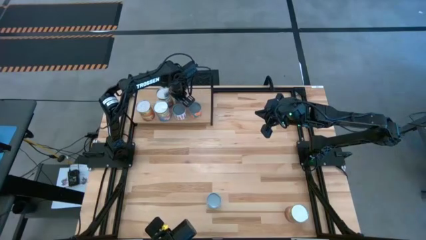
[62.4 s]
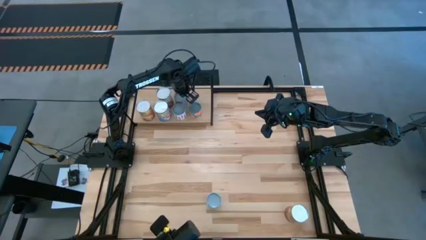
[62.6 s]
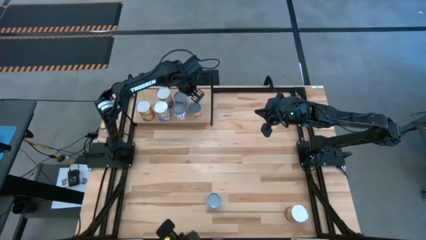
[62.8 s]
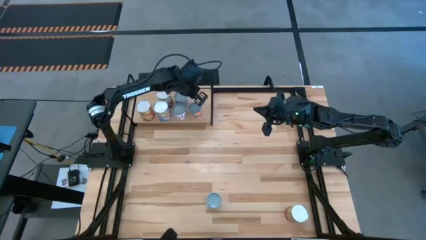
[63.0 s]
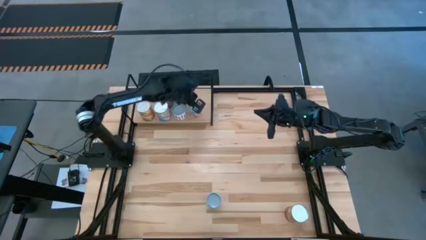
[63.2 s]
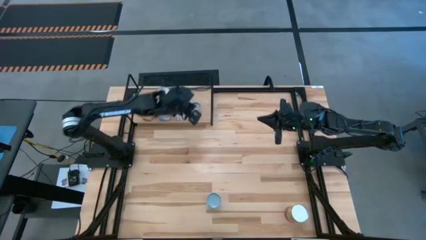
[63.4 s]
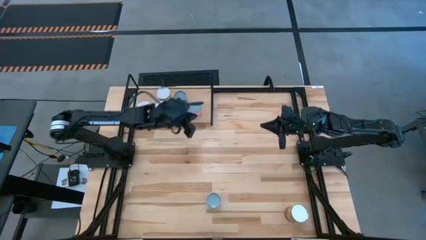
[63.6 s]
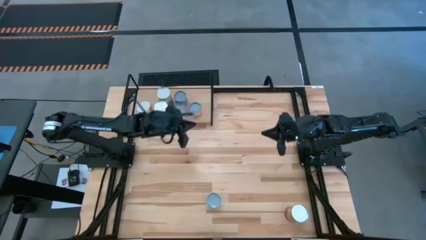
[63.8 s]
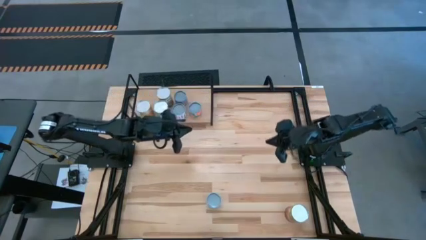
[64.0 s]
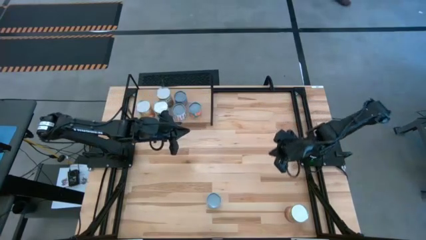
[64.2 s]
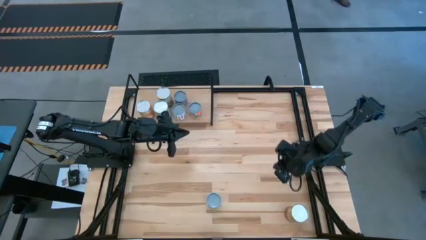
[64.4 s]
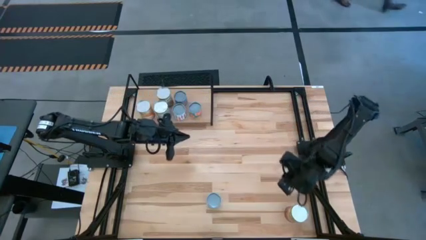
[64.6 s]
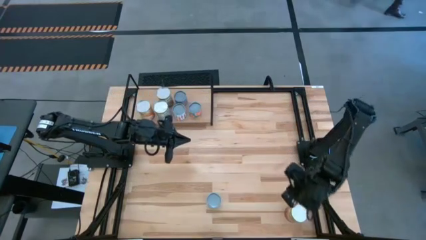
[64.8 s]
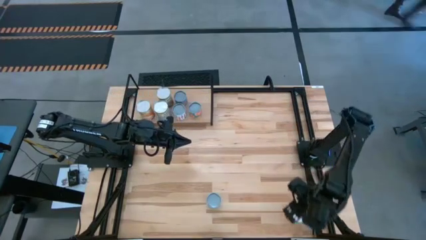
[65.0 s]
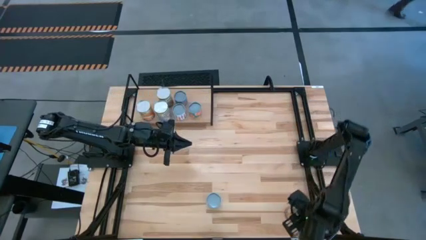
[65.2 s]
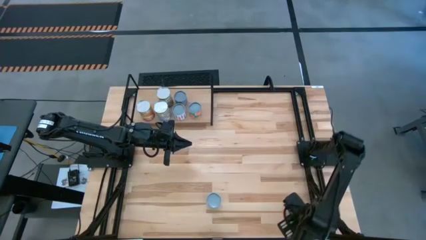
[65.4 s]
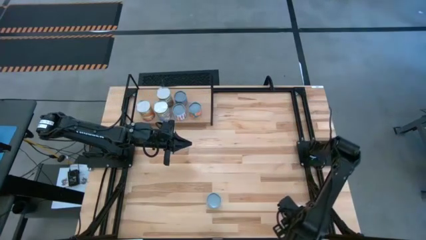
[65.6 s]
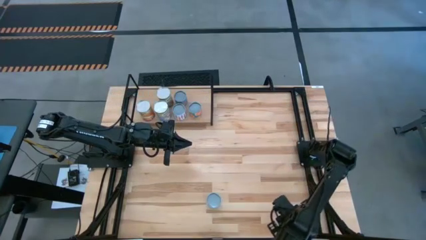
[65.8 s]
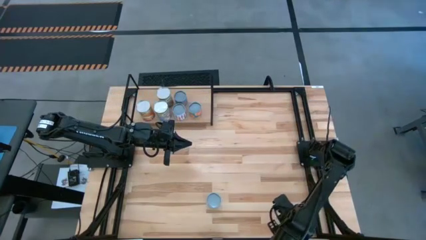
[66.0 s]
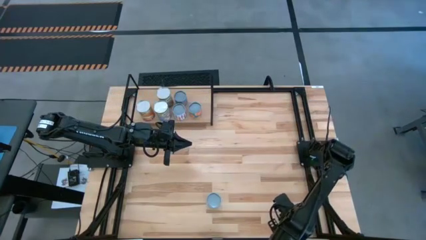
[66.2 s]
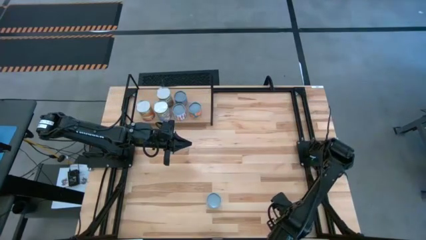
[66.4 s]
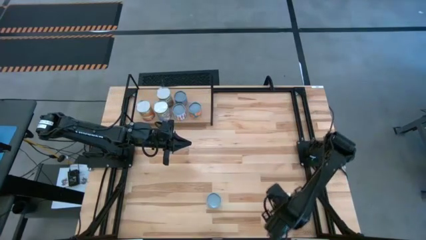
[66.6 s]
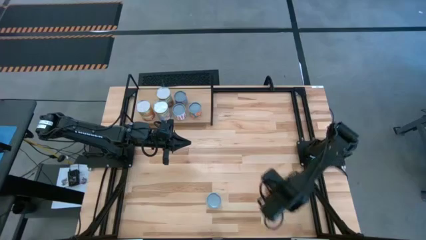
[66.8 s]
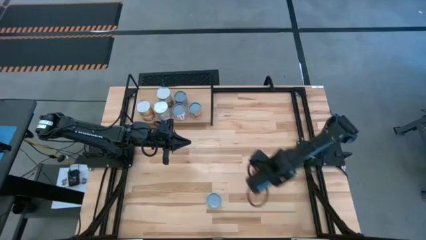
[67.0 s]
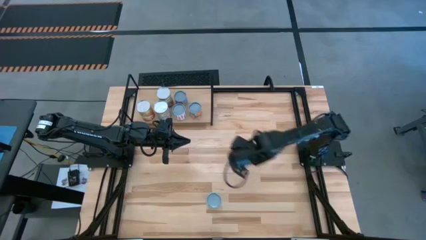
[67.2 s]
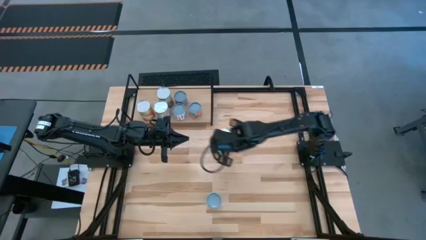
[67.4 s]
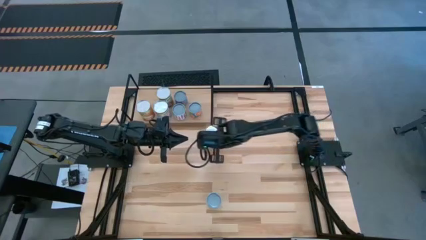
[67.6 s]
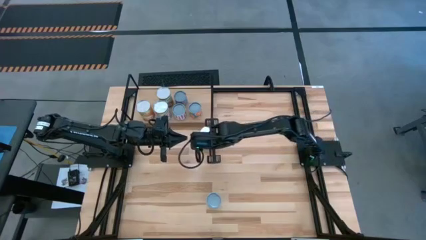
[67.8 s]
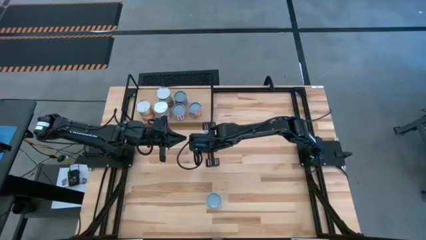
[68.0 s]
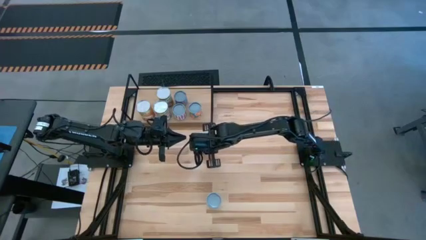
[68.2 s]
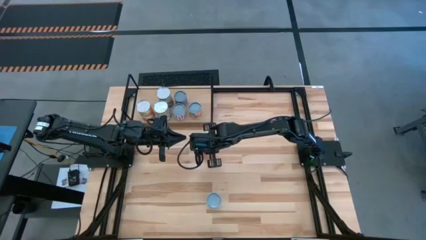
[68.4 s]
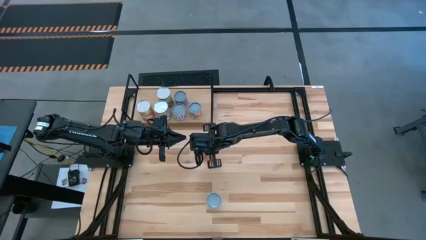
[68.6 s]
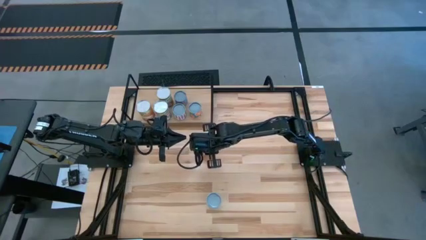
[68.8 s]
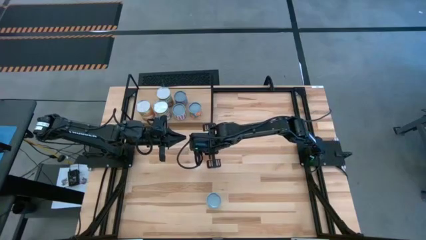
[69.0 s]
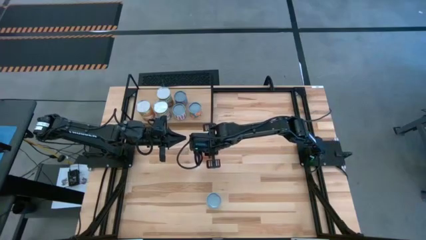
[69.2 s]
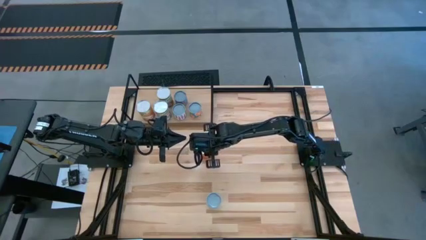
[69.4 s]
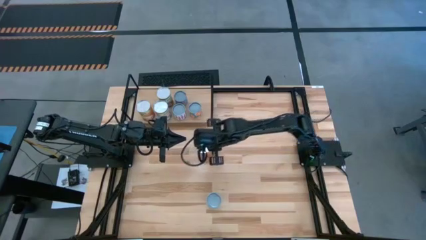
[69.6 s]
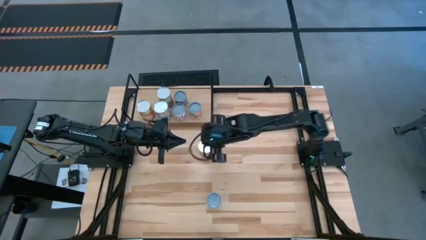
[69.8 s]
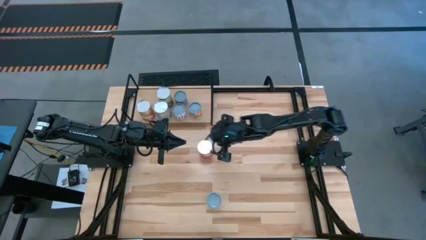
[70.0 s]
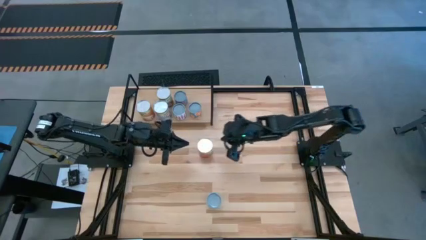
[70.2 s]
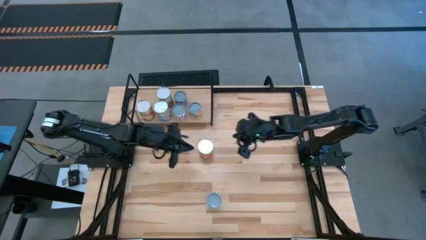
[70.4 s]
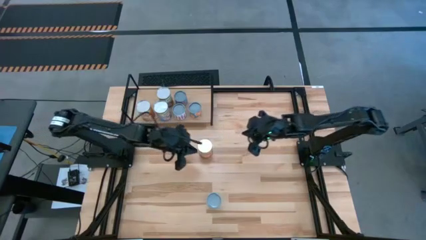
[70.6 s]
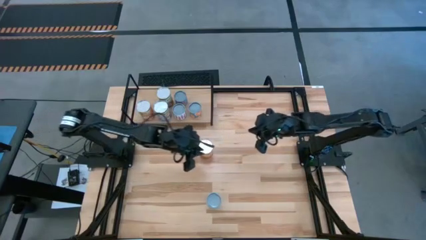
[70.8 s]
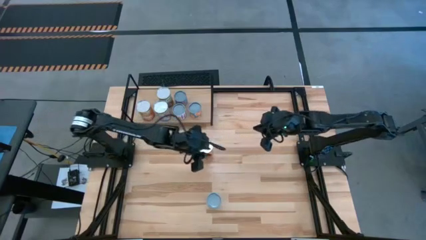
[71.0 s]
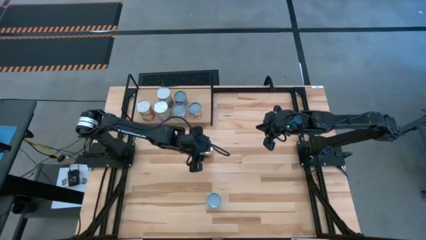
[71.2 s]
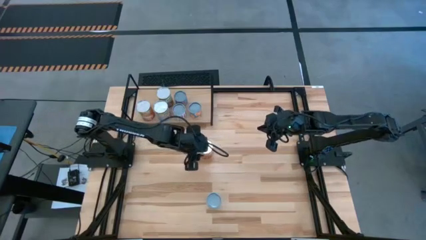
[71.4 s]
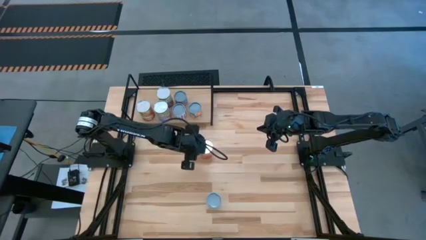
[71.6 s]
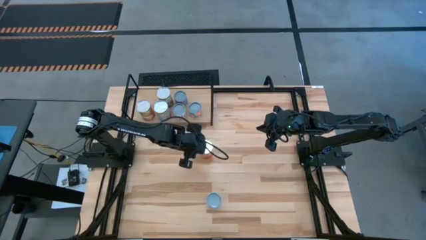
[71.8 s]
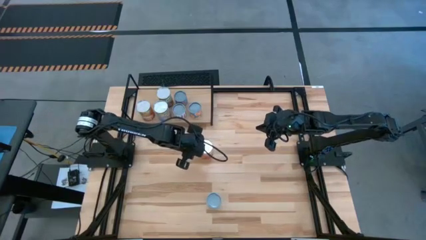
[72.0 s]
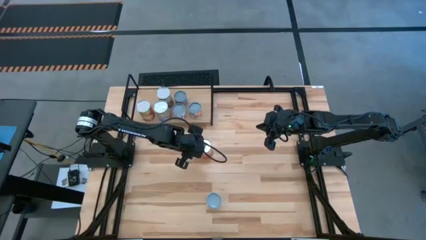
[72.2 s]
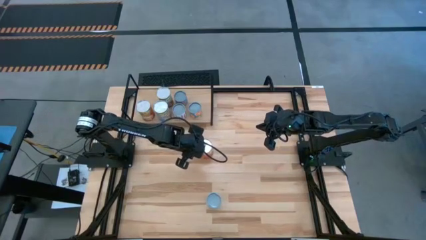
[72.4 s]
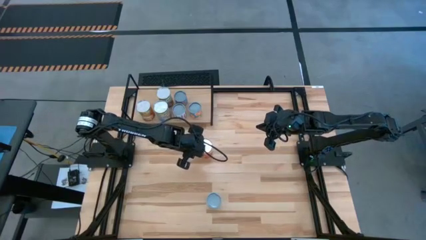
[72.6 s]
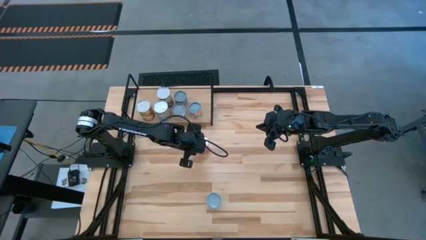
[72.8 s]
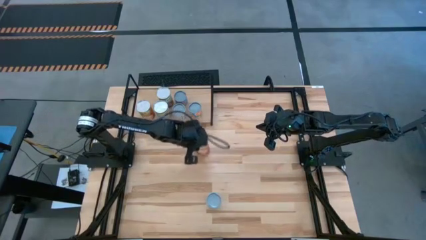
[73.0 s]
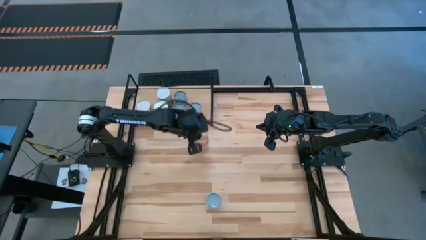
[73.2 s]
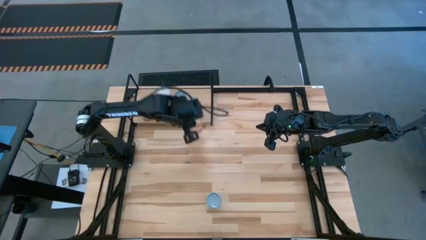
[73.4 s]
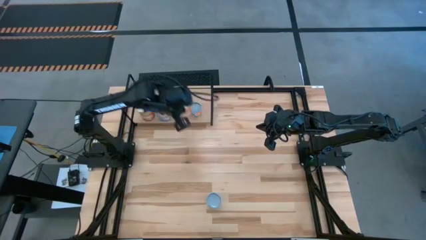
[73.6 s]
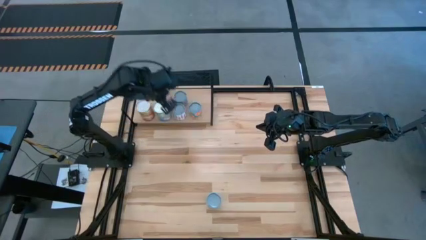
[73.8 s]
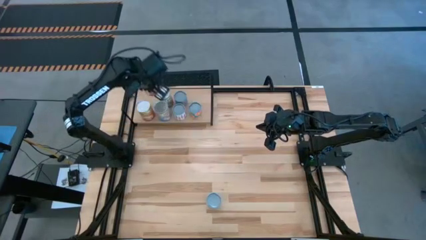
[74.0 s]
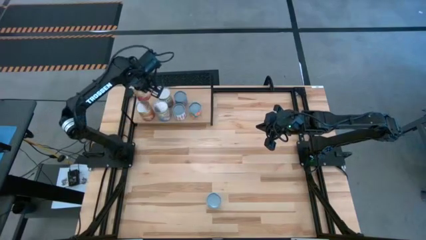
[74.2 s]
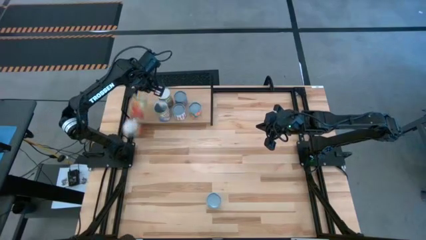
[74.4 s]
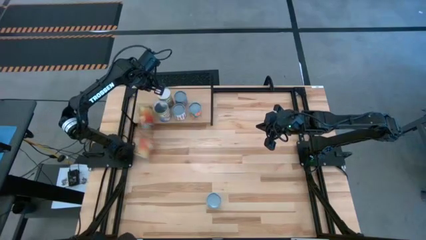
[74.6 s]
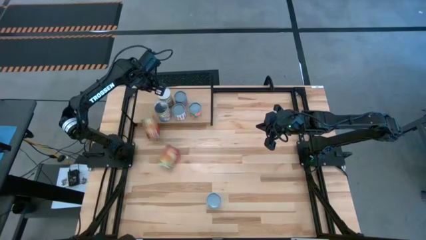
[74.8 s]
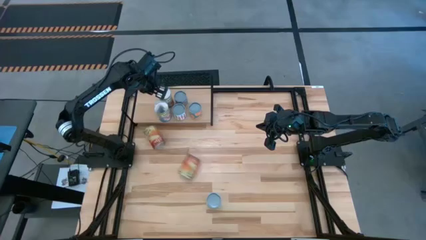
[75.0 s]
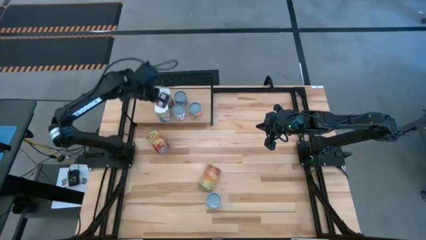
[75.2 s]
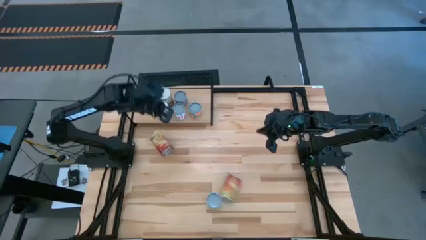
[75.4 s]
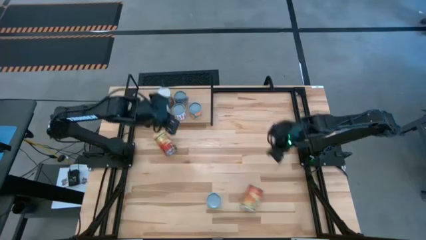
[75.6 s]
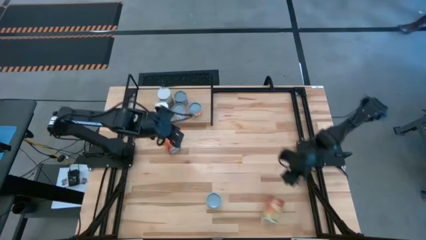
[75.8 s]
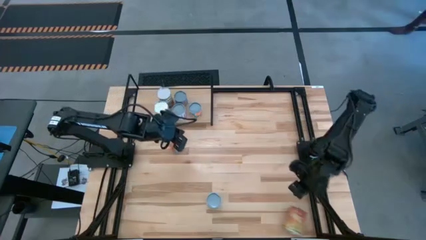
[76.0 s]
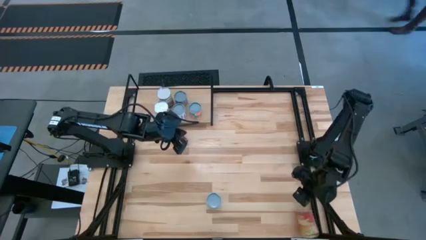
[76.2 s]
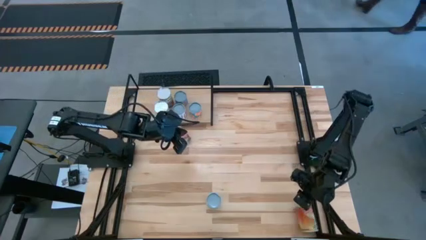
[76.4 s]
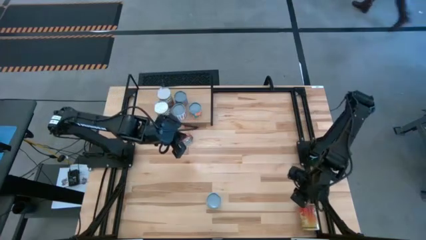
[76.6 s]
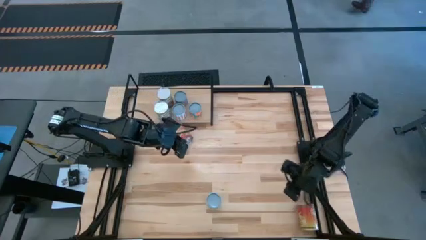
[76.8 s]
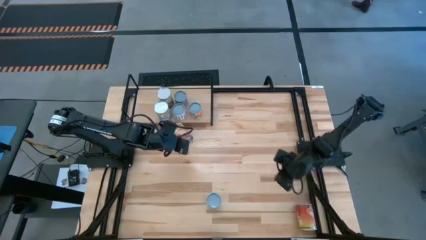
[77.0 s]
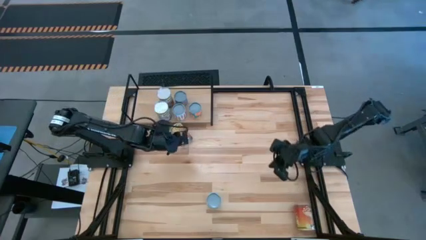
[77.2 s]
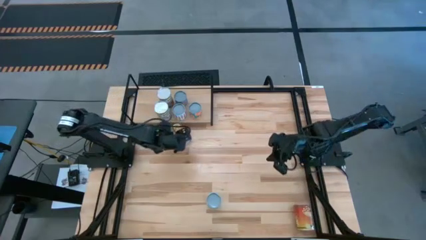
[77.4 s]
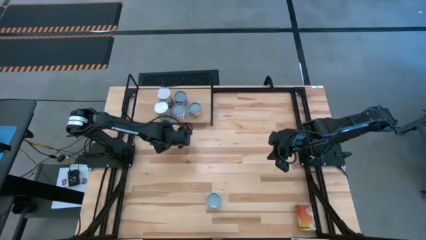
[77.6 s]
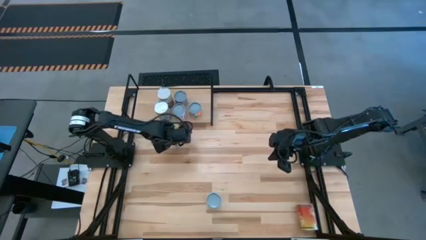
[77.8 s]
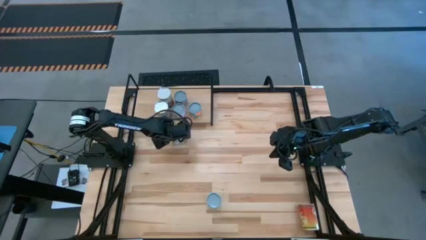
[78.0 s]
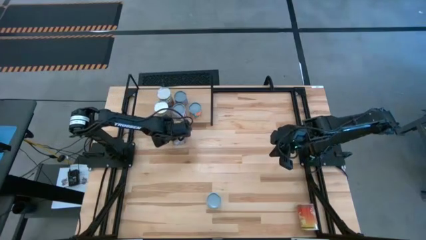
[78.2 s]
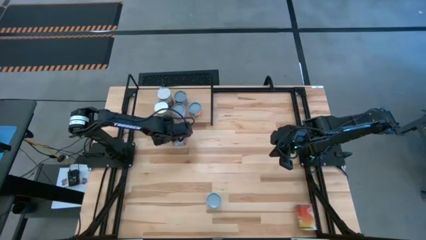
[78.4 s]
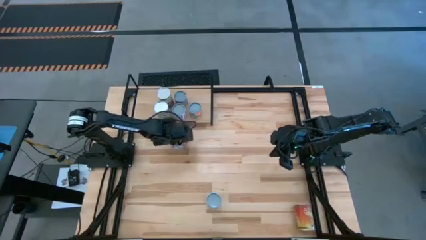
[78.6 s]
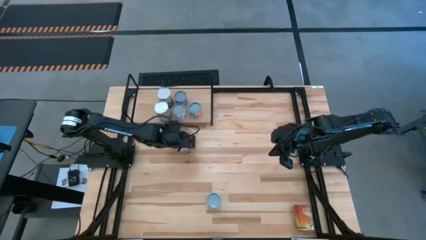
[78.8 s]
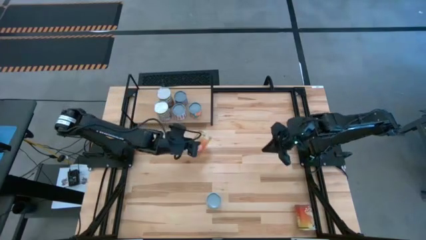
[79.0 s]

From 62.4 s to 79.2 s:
Task: Pick and place cans onto a shelf
Put the large canned corn on the shelf
